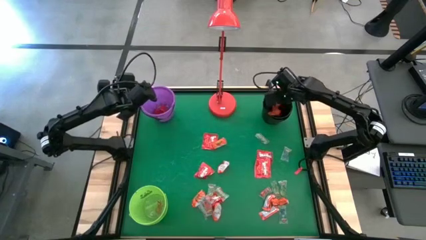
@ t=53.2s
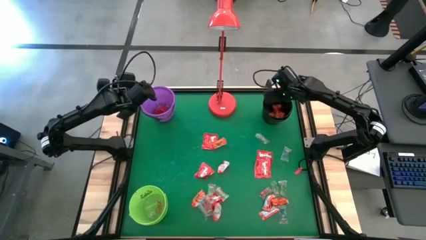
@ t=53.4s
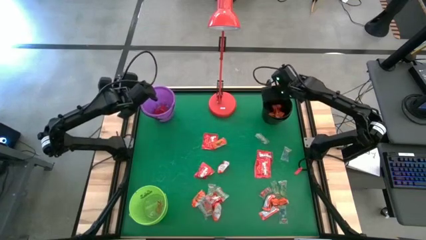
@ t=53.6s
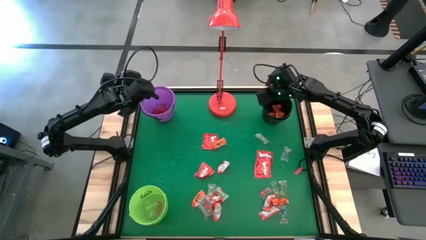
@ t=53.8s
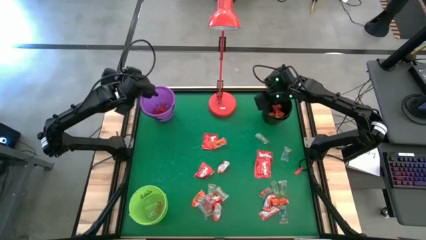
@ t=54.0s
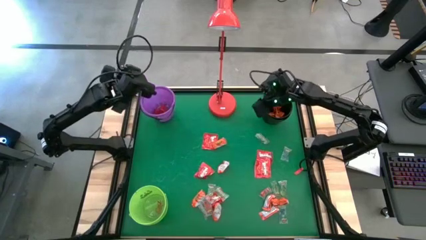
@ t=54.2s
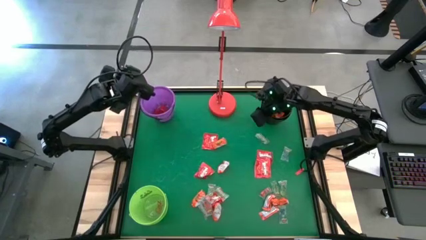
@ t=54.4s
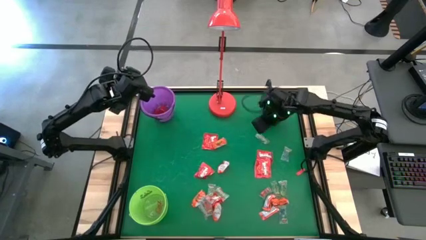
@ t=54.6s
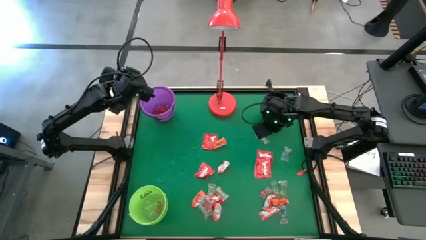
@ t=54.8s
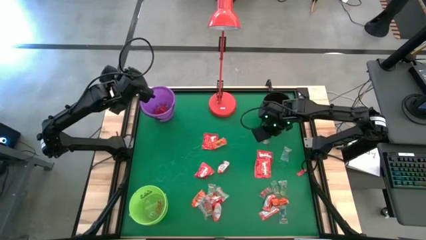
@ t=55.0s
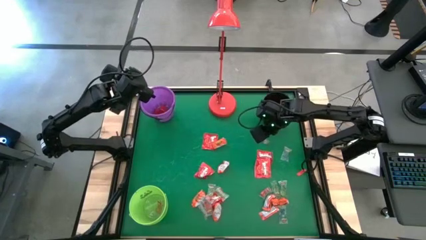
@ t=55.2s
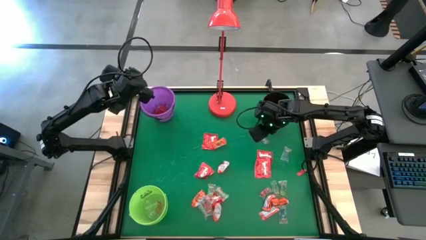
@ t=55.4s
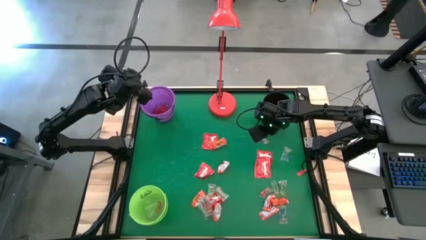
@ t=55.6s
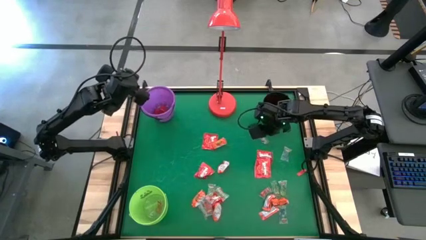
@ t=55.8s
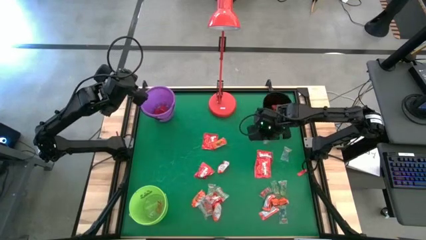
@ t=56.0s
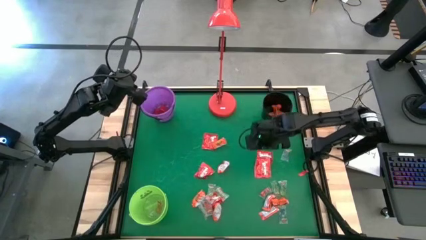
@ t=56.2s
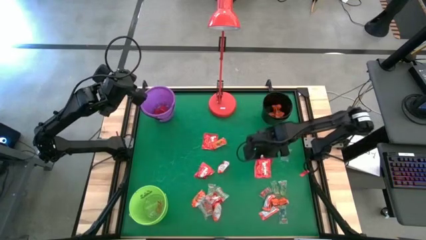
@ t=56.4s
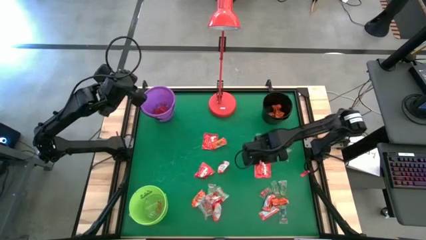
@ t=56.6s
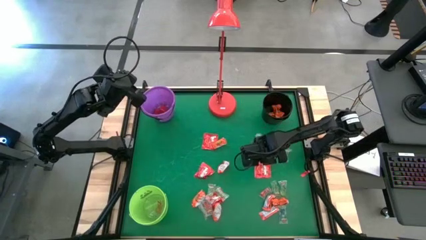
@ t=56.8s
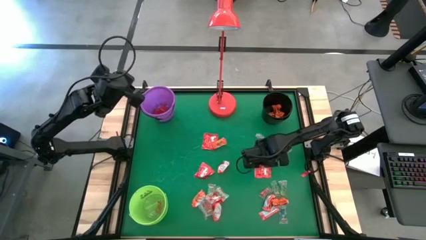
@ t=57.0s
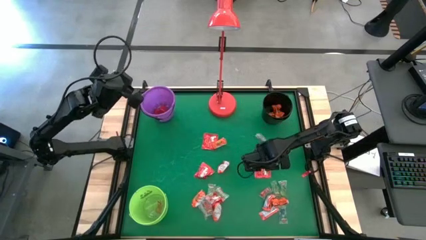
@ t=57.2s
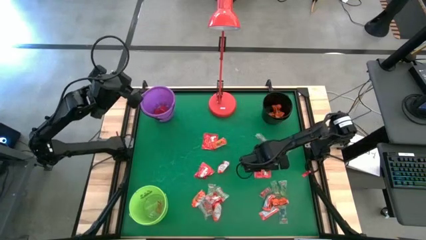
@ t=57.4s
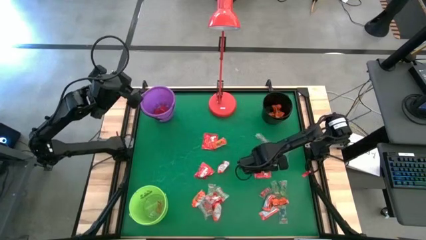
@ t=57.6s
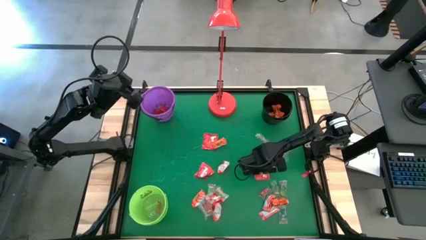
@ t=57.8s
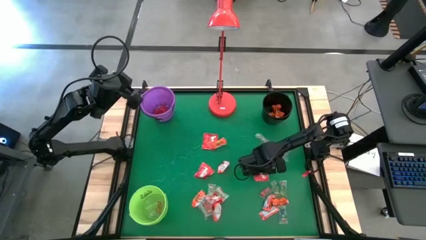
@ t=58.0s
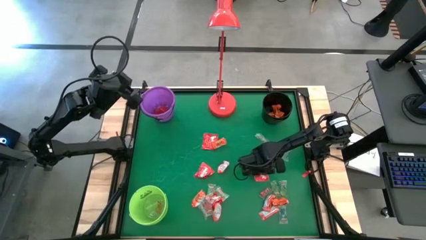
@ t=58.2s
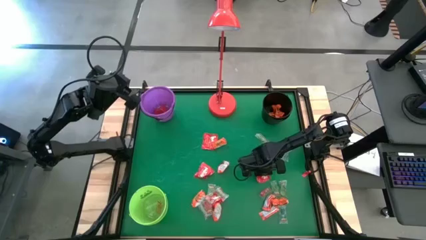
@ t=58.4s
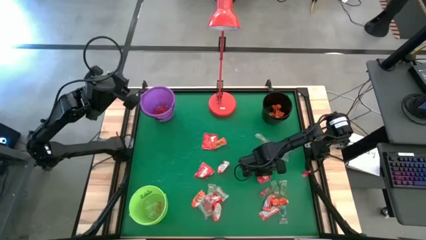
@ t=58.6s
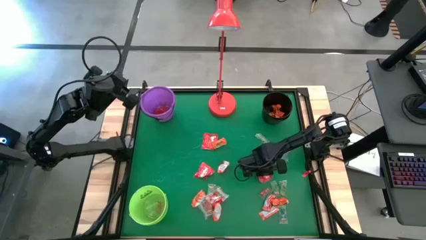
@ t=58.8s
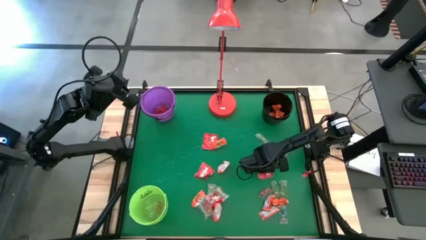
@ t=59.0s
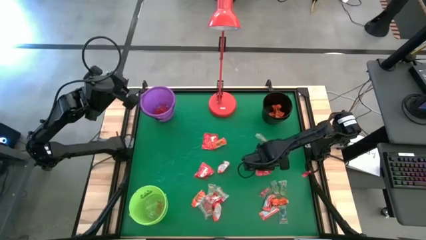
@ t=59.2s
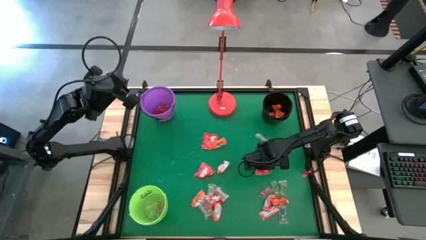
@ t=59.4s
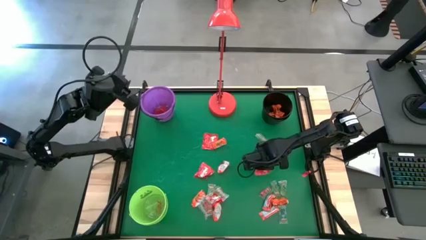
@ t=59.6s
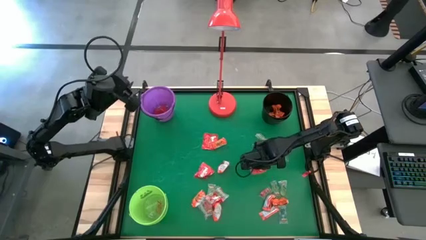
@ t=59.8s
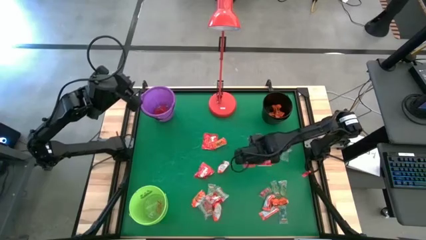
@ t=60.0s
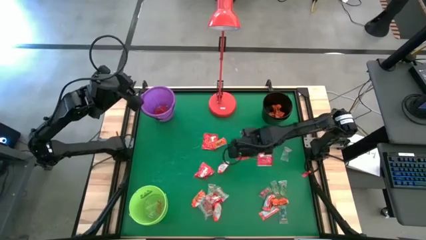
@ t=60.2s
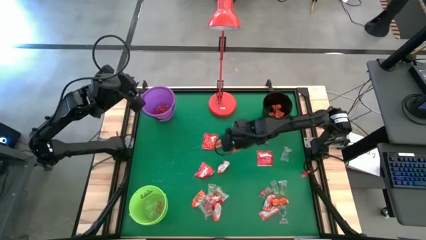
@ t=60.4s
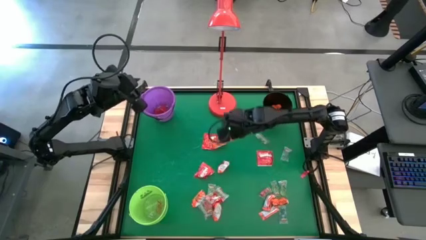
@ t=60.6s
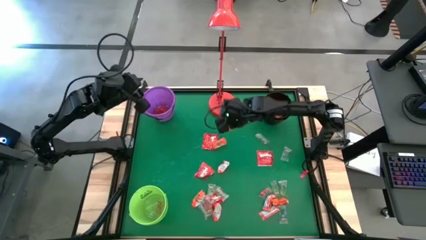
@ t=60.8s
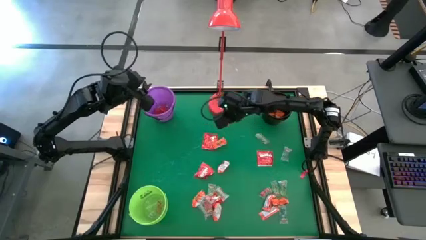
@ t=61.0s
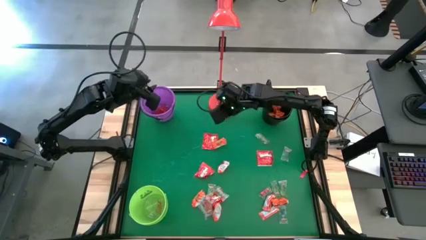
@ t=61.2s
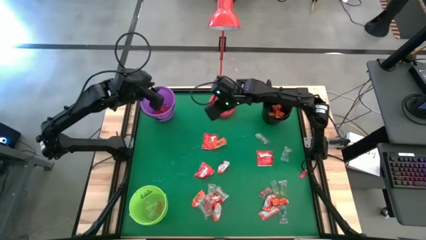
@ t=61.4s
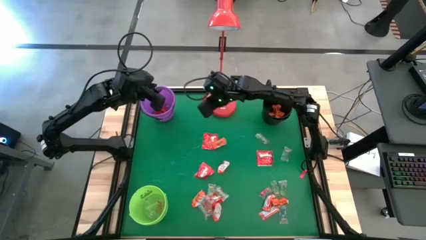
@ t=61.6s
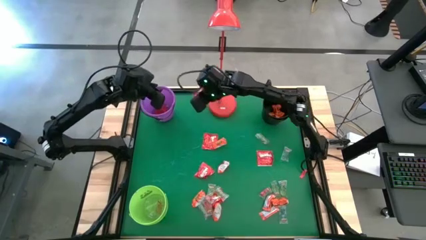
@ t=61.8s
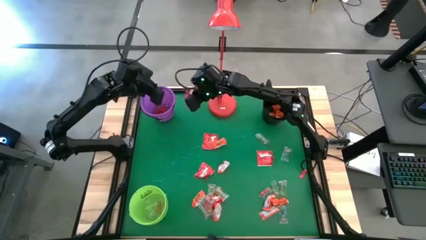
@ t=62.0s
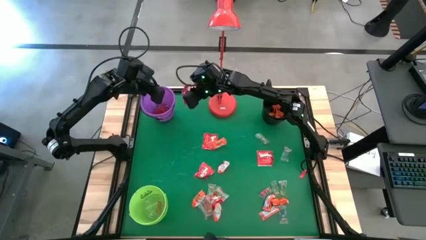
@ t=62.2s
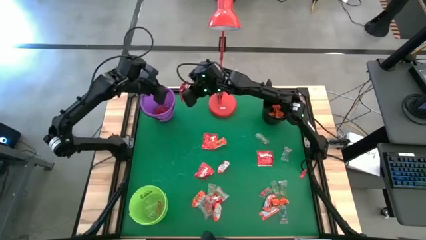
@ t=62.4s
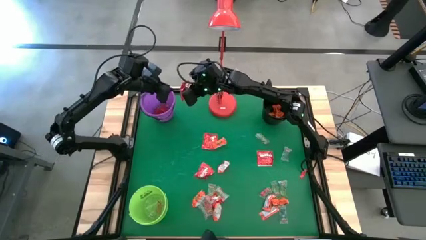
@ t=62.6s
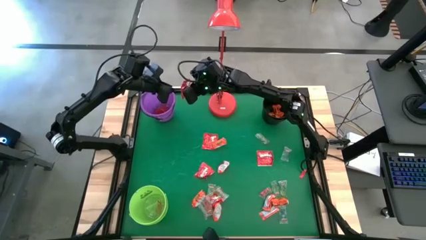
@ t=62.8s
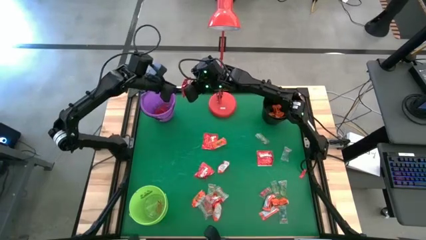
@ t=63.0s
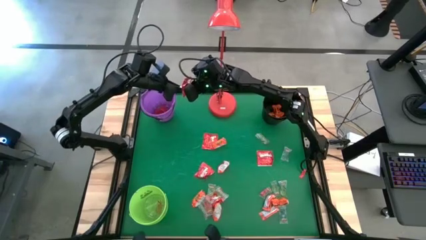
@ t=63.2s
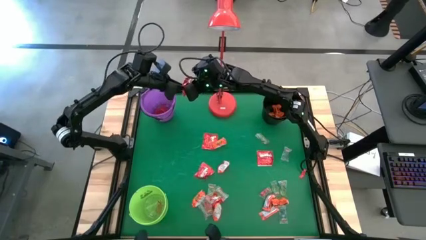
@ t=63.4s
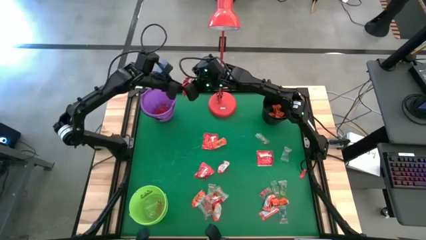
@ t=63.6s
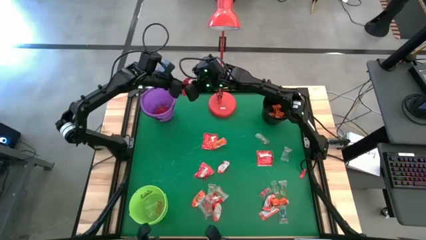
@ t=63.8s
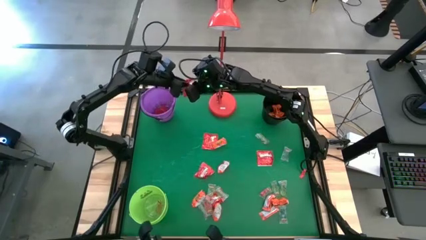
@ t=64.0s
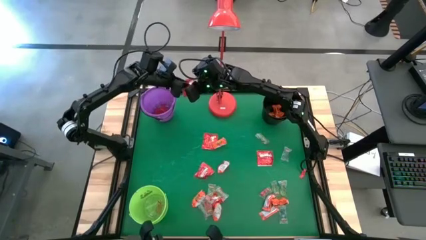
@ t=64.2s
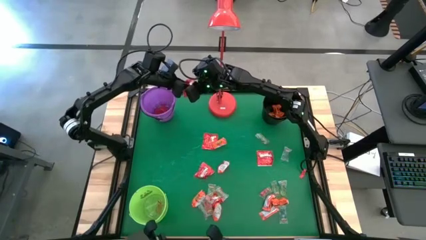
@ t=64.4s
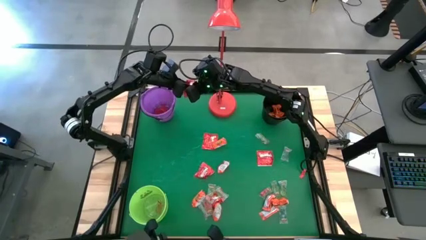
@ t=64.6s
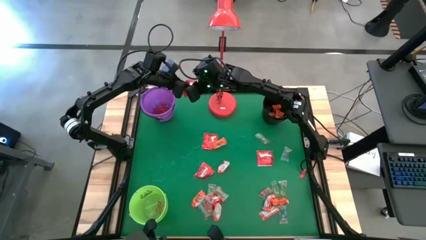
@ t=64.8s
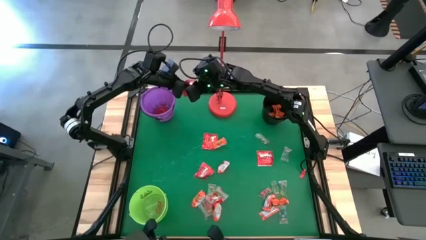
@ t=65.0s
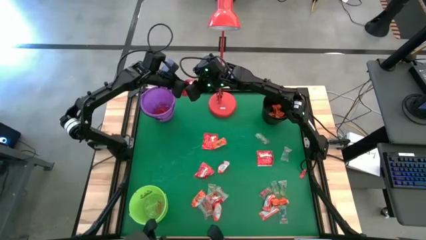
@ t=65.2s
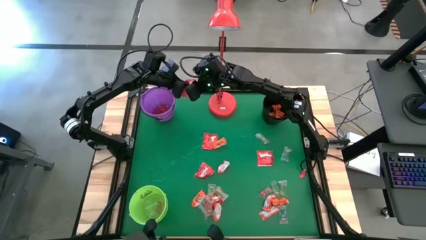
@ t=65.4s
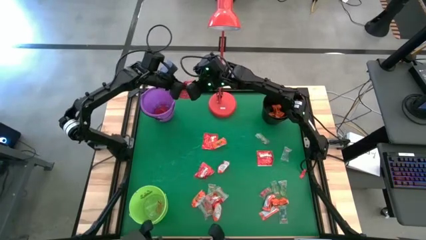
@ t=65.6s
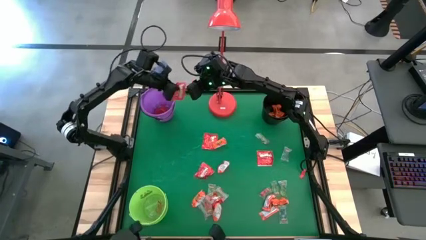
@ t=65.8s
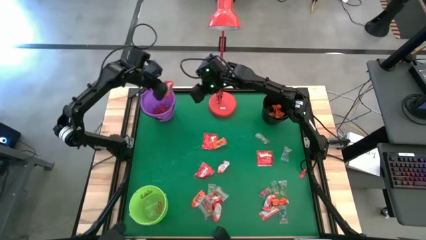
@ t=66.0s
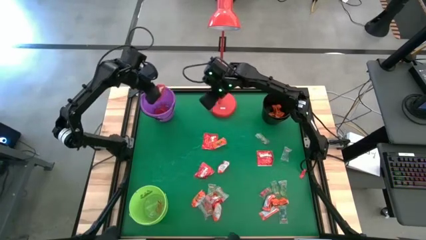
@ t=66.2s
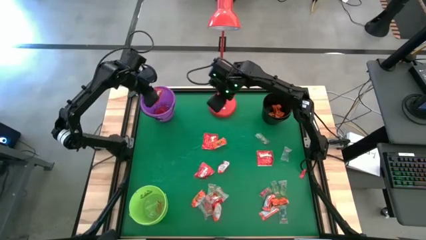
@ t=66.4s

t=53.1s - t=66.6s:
Task: Sort candy
Put the red candy into the violet bucket

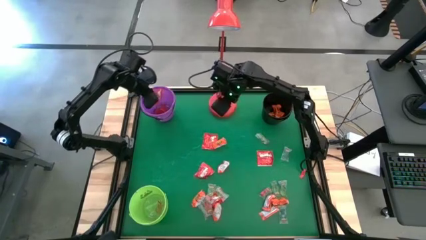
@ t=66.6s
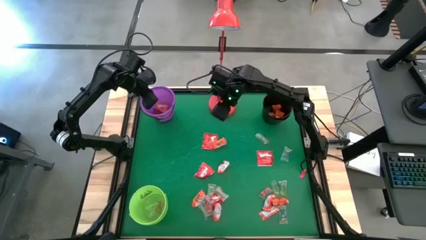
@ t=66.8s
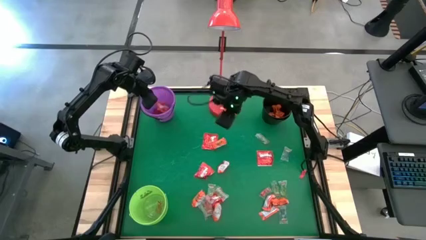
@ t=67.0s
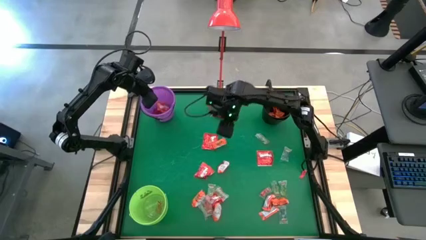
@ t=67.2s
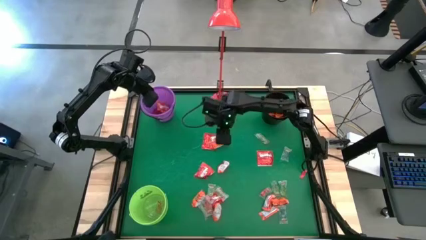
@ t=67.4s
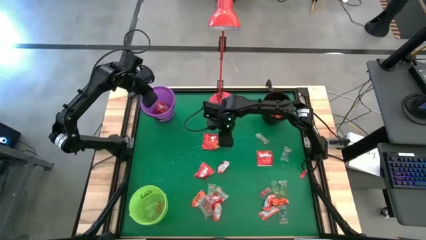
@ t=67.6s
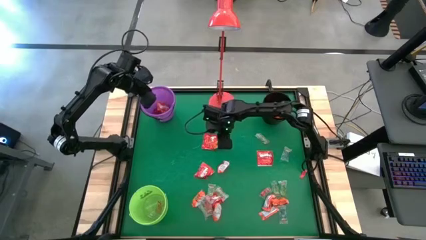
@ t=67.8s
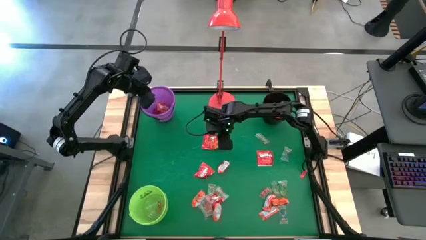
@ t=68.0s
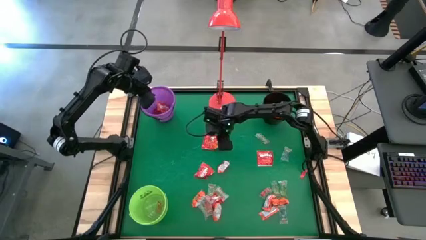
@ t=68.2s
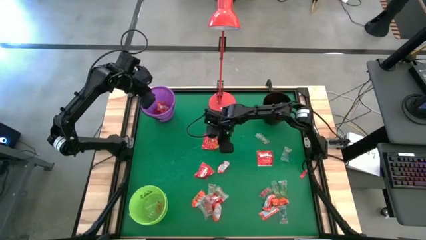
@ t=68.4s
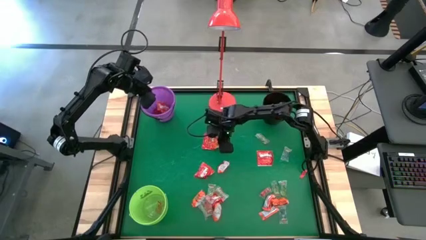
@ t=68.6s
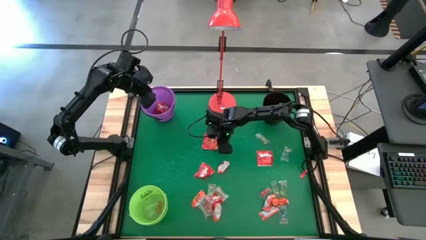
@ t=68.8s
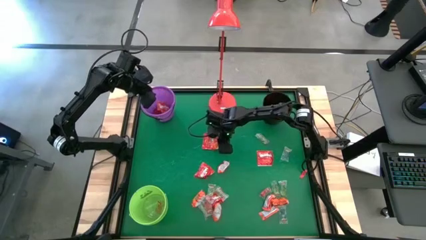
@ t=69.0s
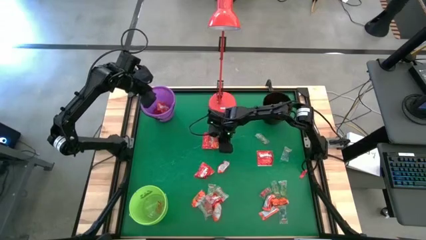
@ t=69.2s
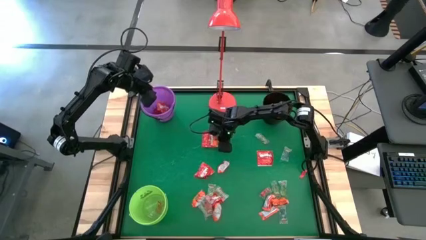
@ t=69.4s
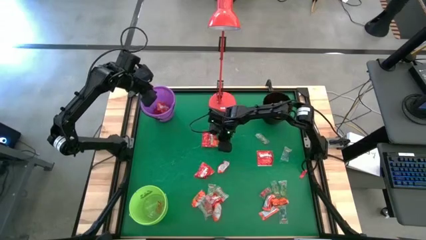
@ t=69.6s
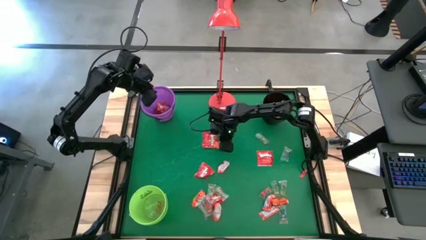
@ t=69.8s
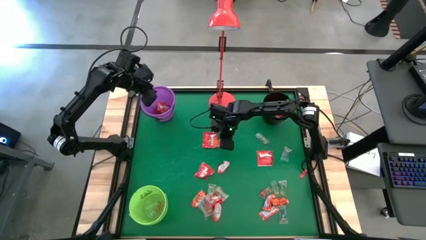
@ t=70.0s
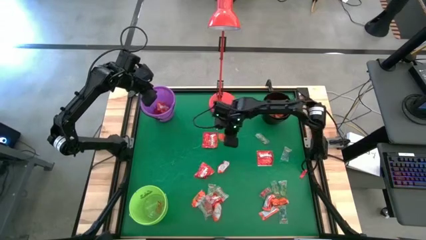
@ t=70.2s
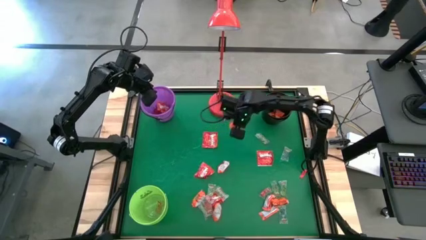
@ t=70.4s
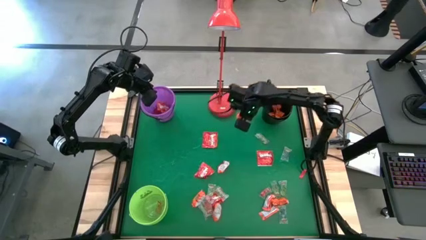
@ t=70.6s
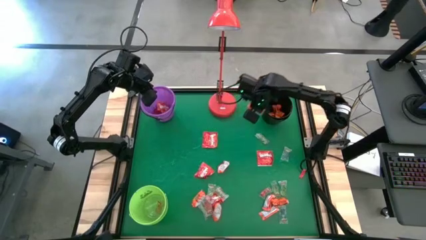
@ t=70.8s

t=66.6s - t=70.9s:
Put the orange chocolate into the black bucket
